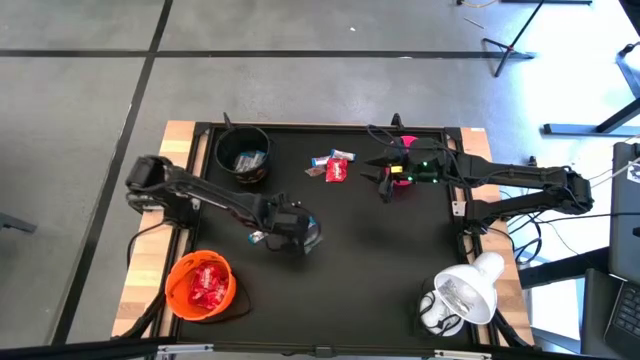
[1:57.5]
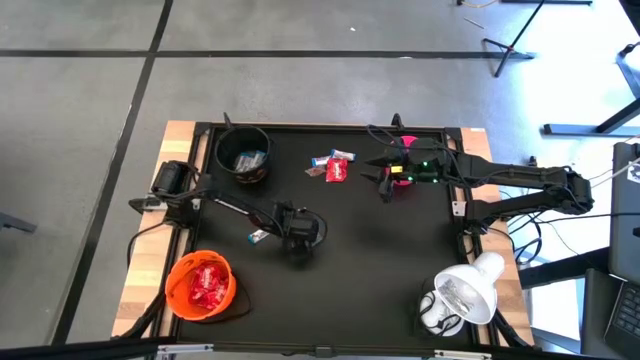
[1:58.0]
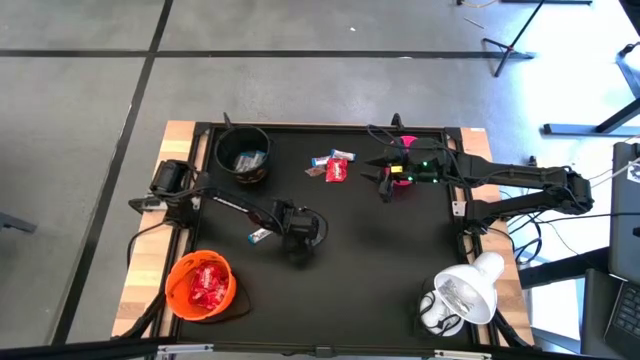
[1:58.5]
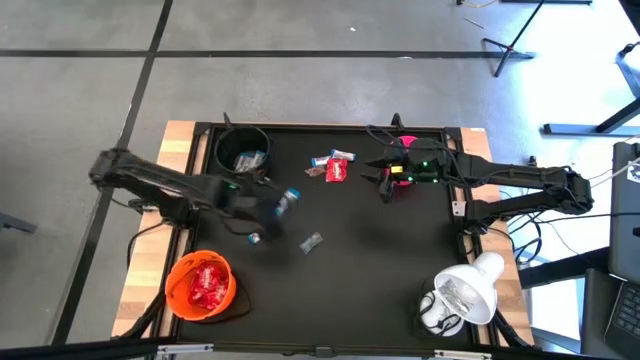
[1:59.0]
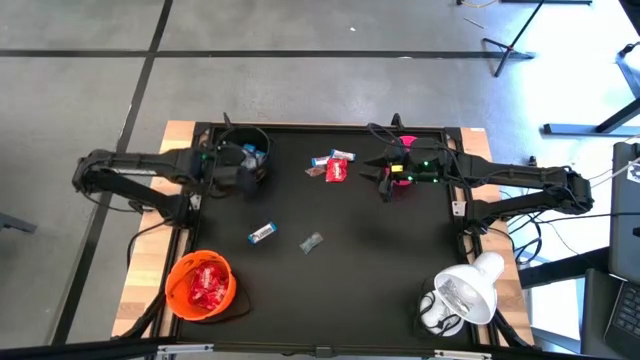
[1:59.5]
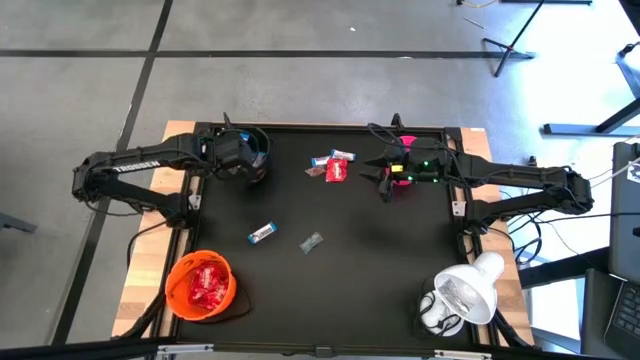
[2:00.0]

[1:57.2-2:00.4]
Task: Sort candy
Put the white chocolate bar into the black bucket

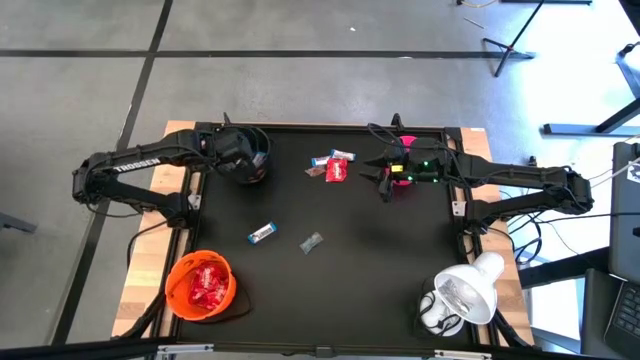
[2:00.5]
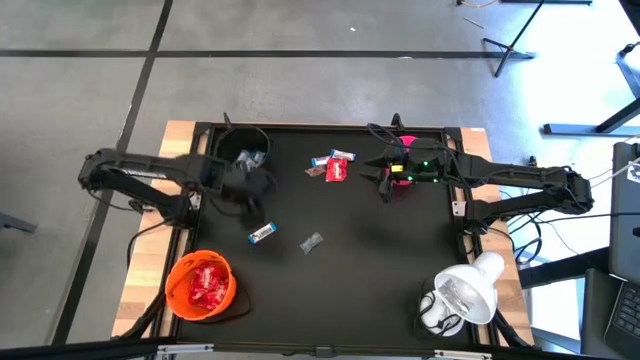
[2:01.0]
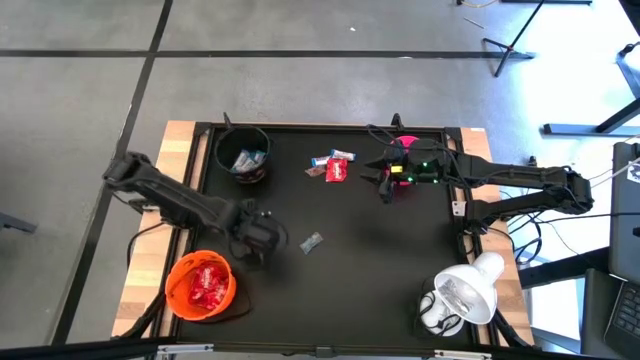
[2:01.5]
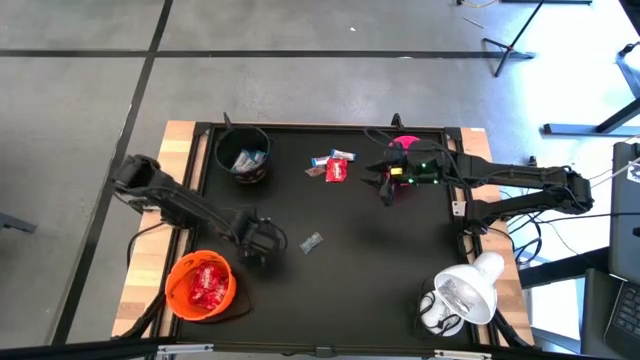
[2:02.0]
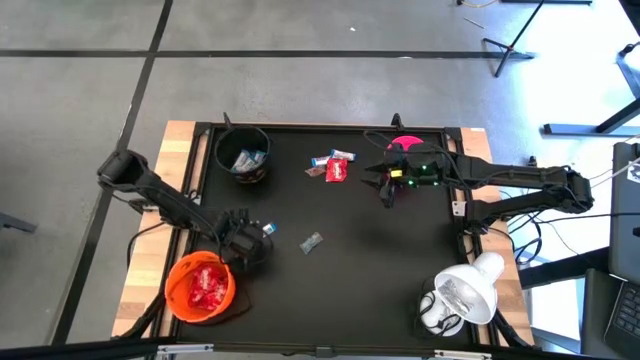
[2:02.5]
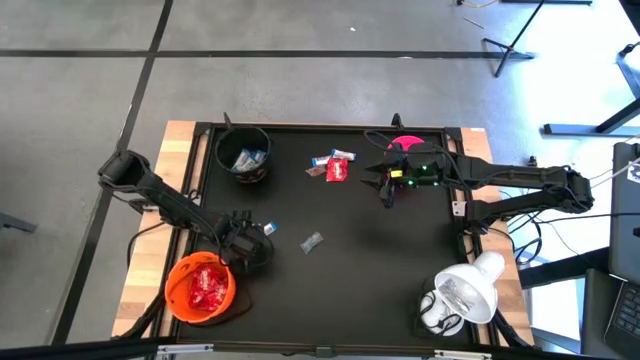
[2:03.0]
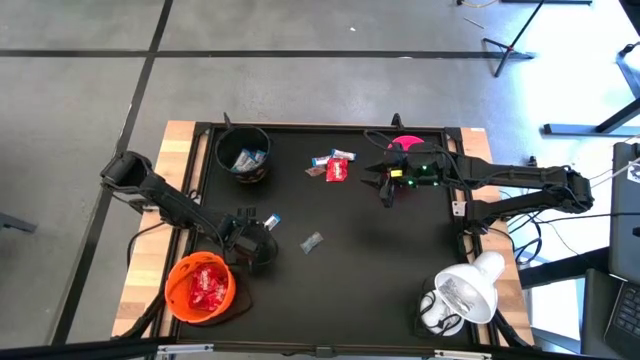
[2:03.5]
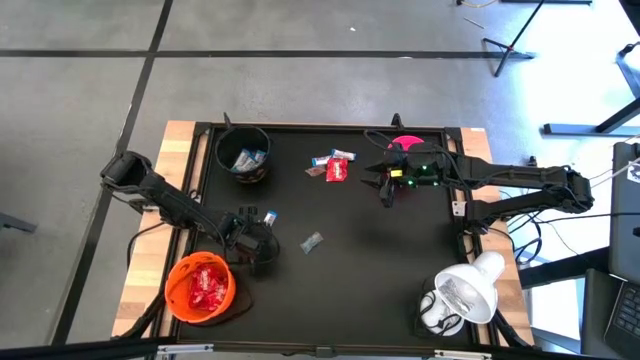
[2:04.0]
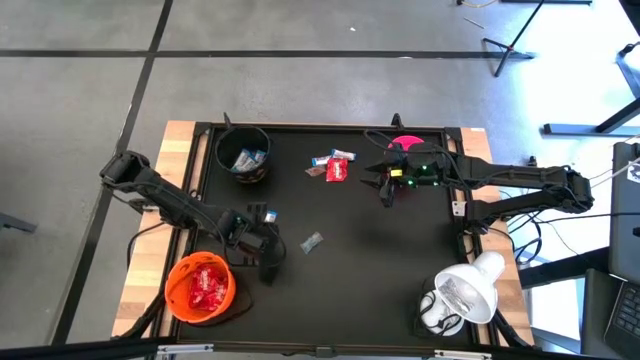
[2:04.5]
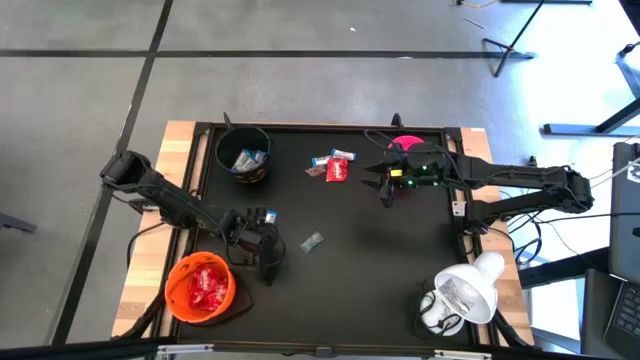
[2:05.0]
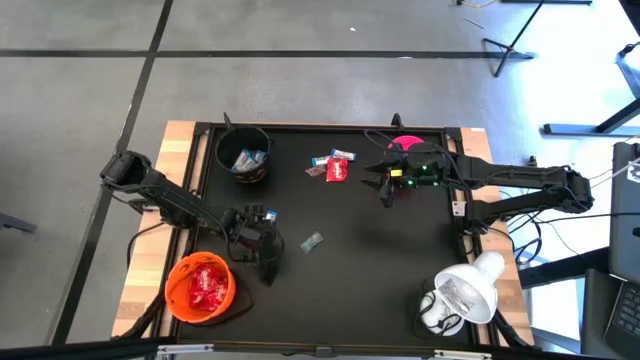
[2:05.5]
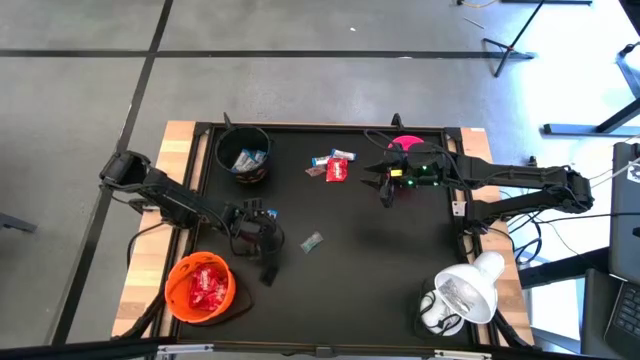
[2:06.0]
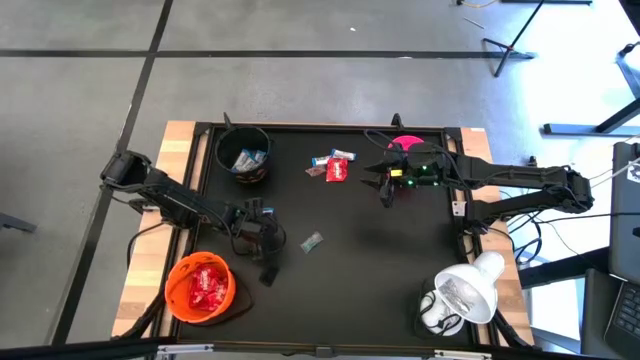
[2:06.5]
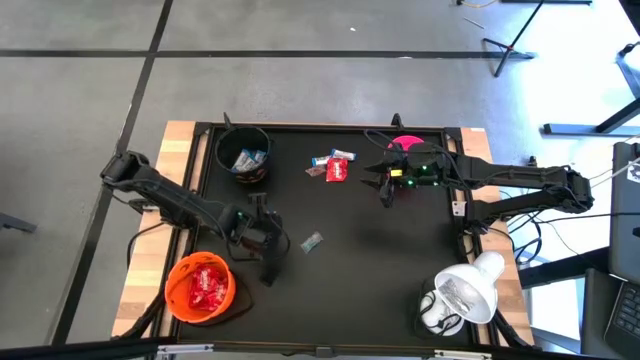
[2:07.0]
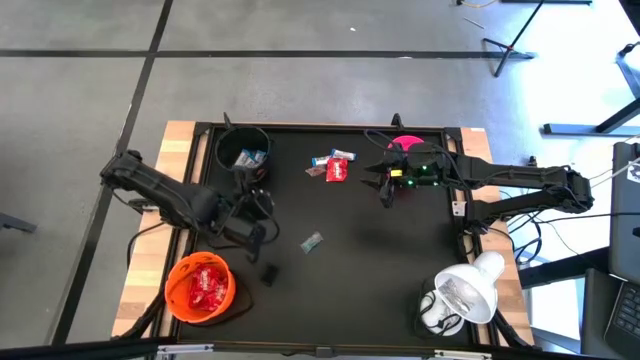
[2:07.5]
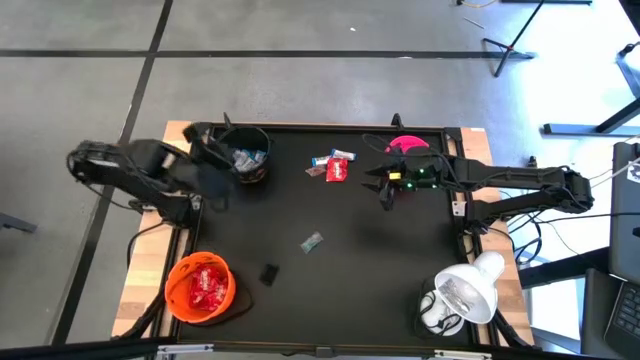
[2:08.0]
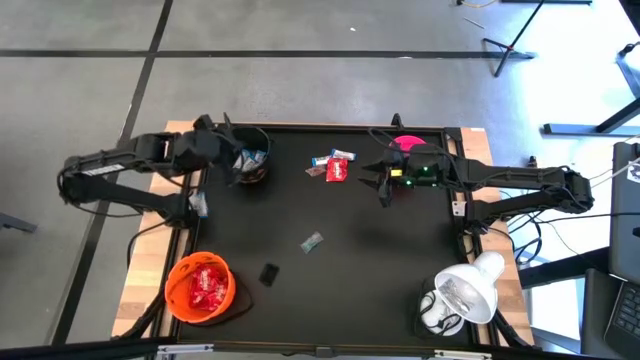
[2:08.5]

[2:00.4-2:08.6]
Put the white chocolate bar into the black bucket

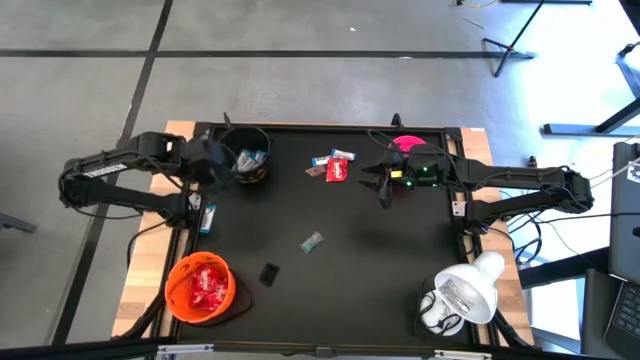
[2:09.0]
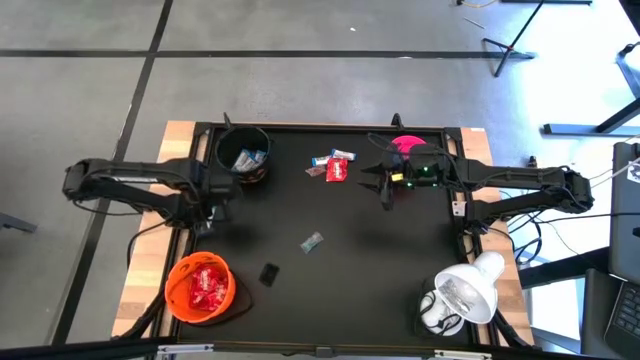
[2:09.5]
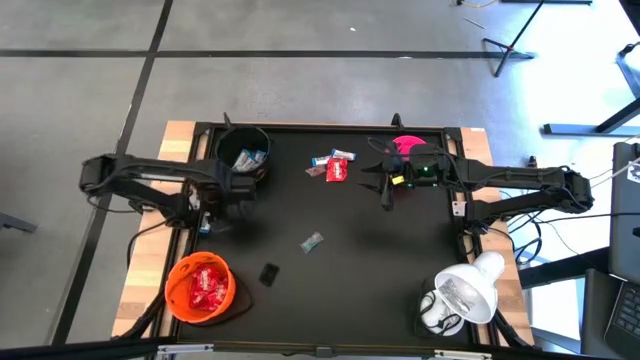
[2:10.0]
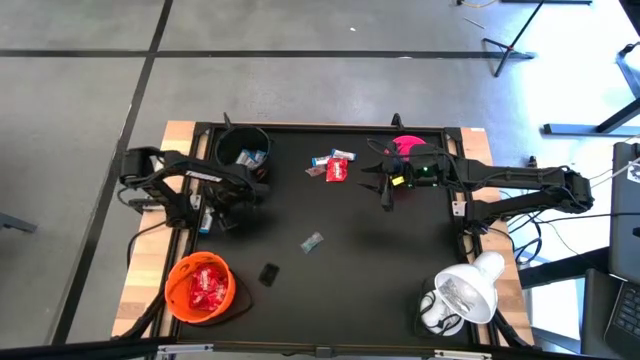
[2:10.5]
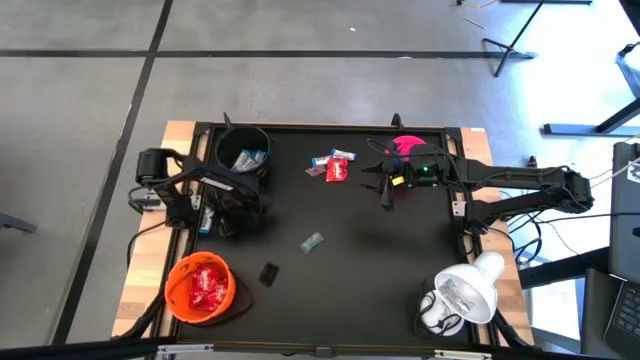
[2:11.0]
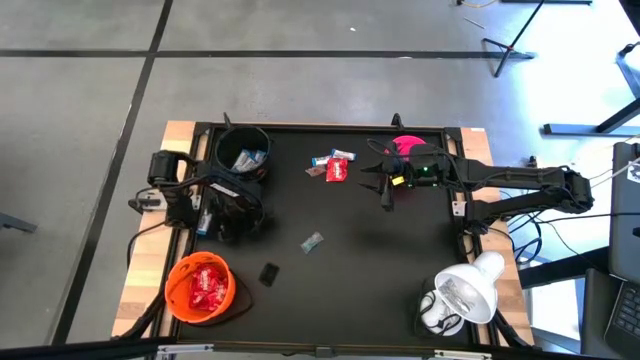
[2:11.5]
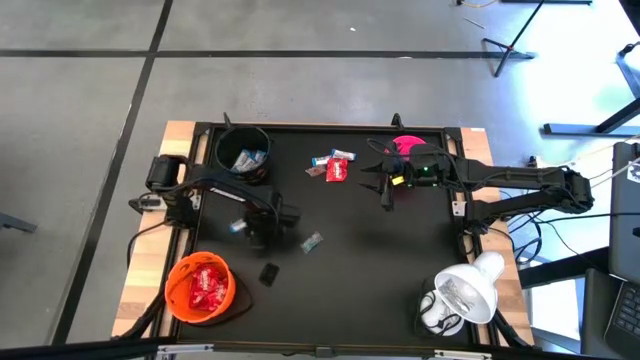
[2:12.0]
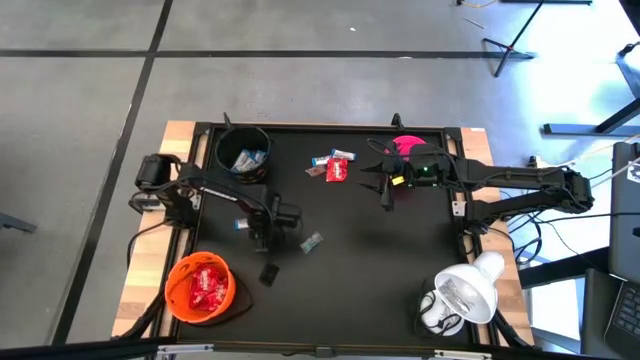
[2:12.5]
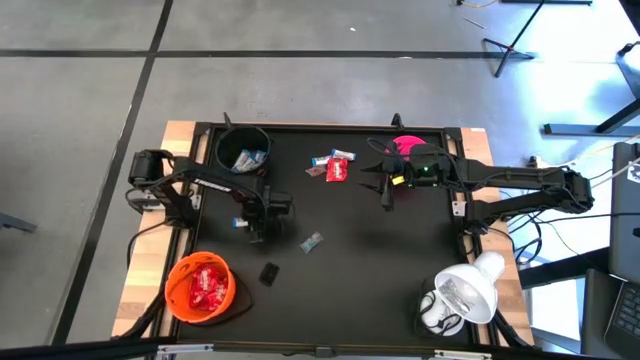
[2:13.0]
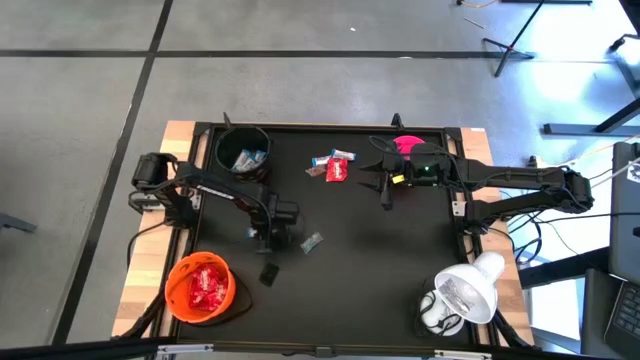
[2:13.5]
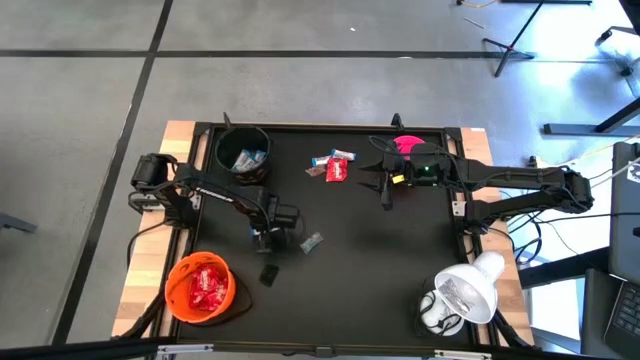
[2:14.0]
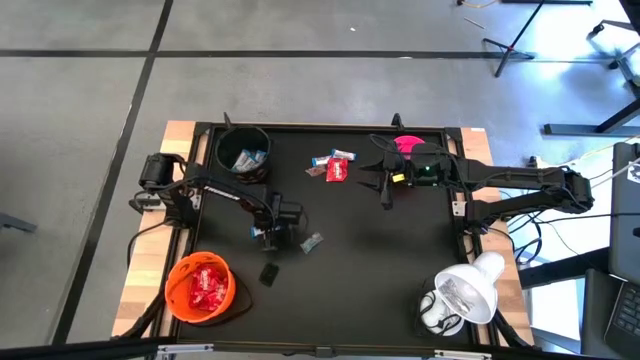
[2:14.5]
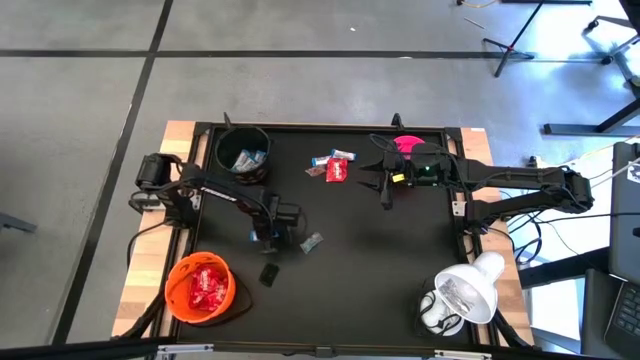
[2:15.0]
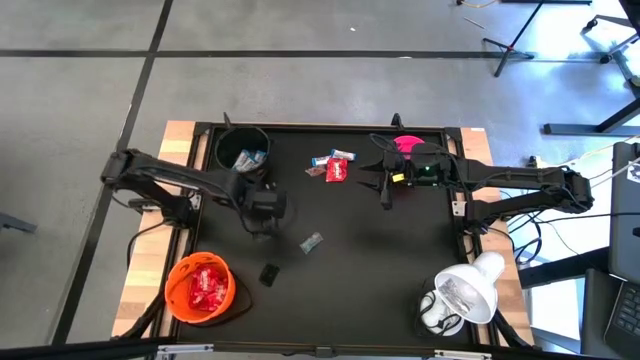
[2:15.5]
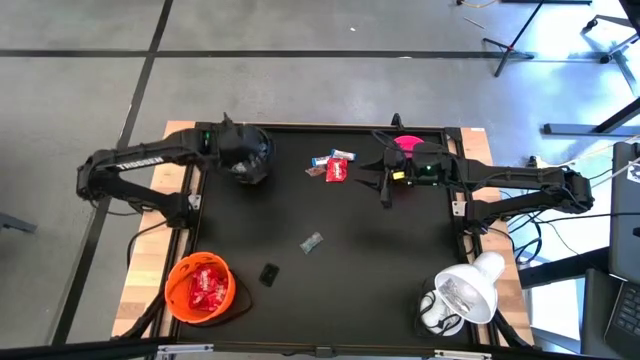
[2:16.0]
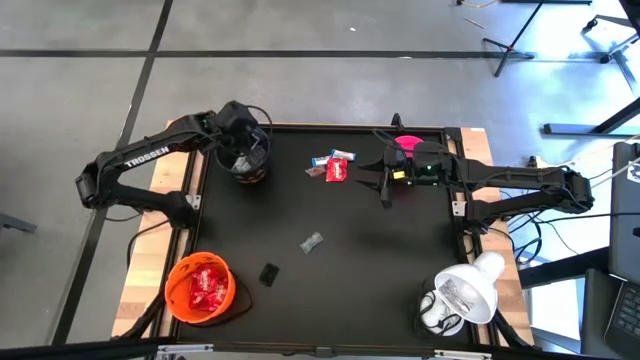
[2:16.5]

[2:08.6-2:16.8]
Put the white chocolate bar into the black bucket

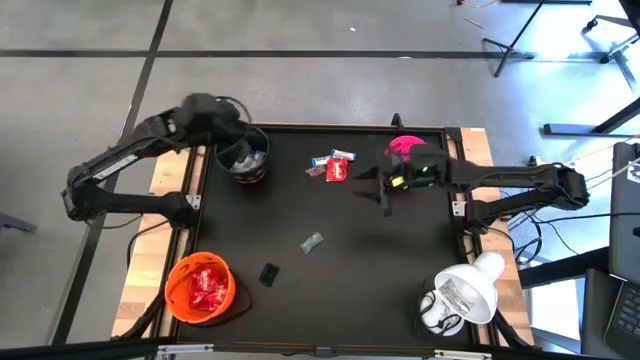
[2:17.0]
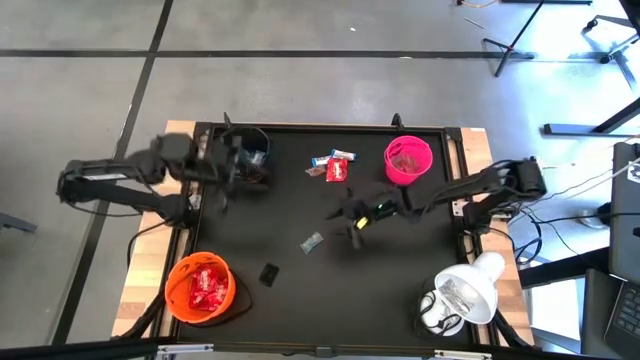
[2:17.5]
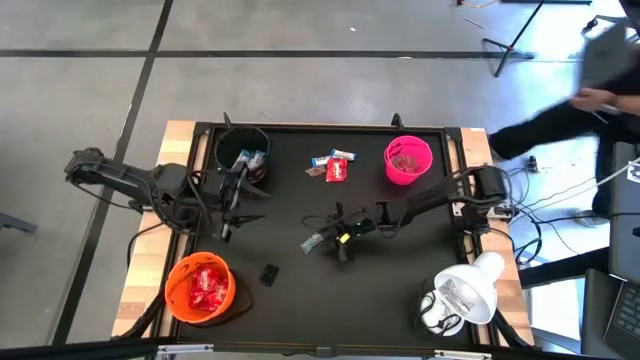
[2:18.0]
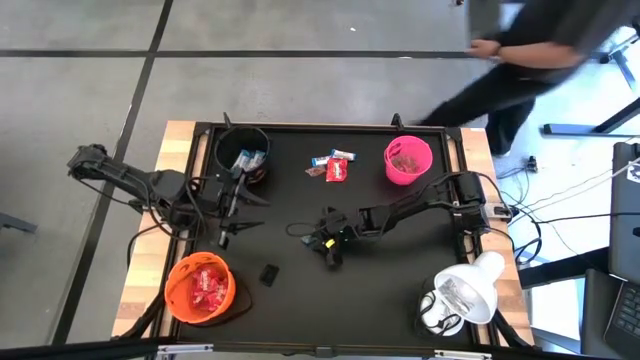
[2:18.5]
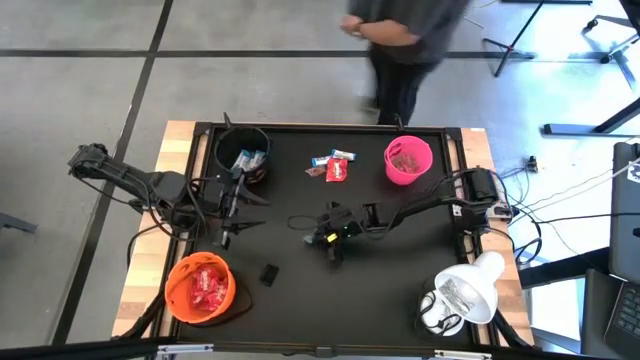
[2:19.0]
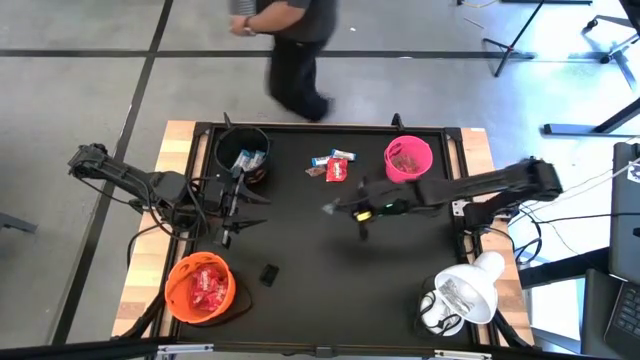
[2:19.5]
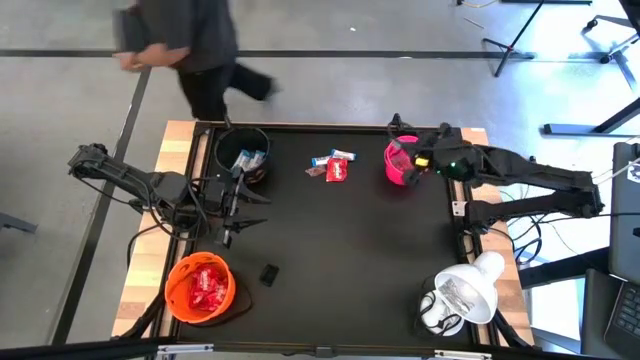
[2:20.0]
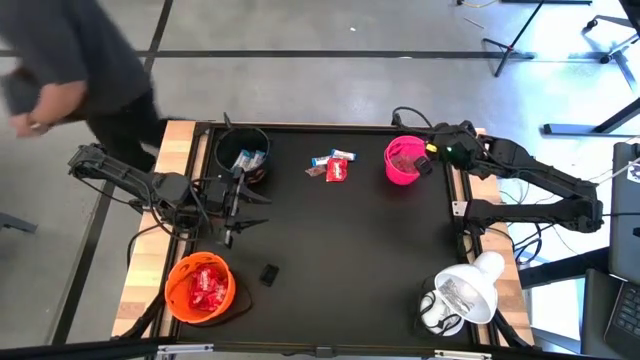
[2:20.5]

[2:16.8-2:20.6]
Put the blue gummy into the pink bucket
